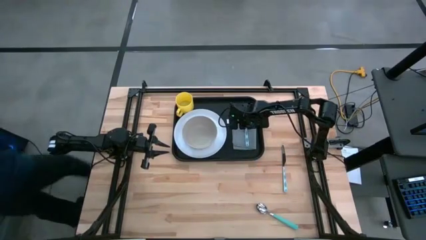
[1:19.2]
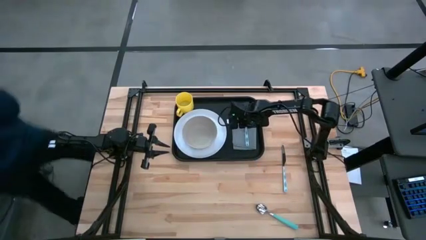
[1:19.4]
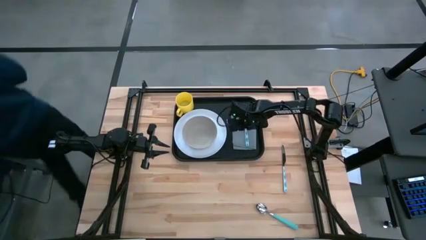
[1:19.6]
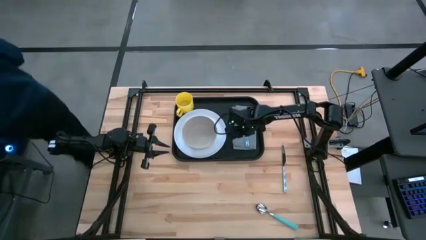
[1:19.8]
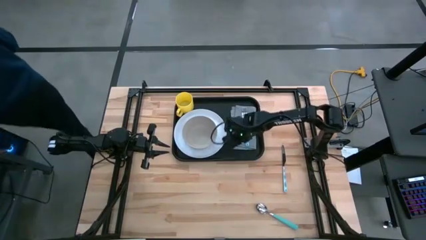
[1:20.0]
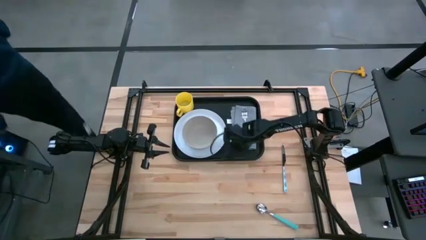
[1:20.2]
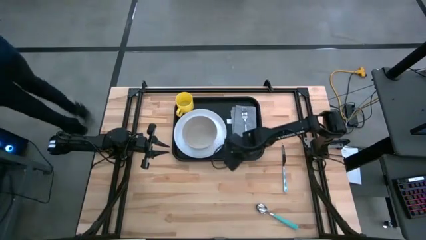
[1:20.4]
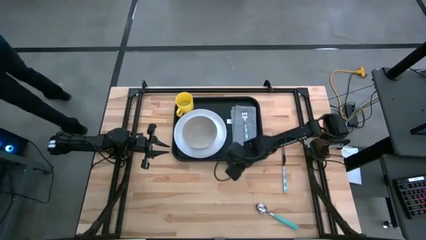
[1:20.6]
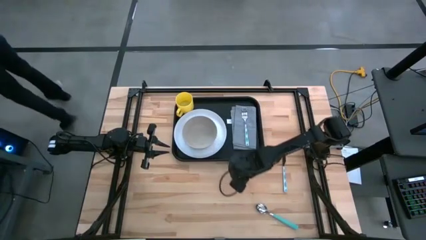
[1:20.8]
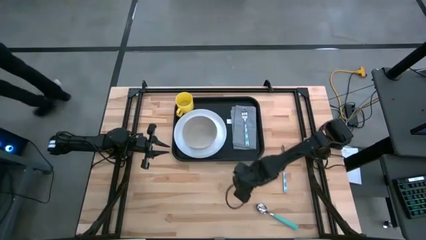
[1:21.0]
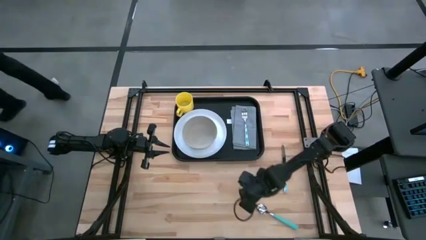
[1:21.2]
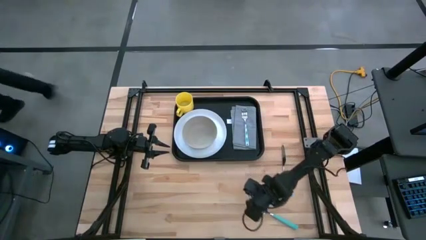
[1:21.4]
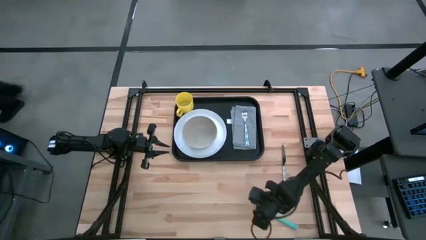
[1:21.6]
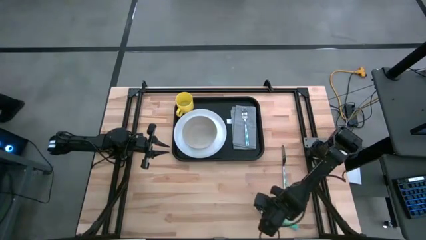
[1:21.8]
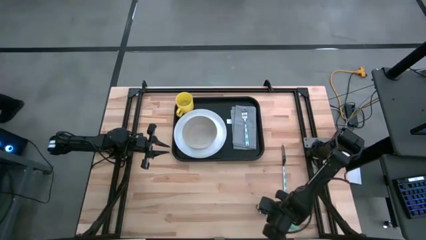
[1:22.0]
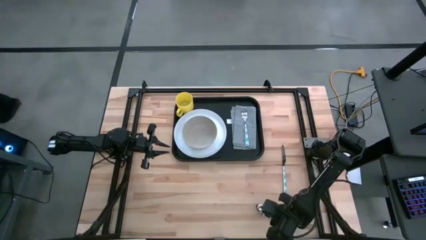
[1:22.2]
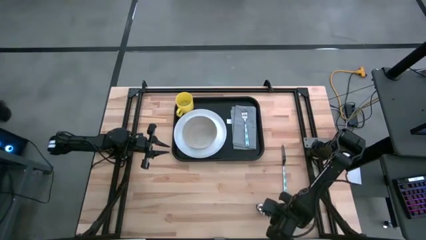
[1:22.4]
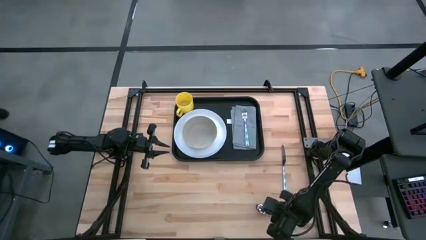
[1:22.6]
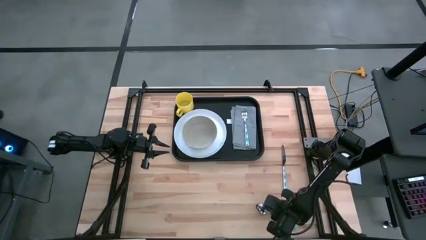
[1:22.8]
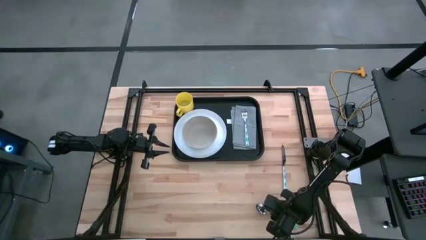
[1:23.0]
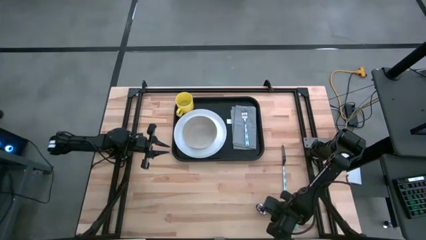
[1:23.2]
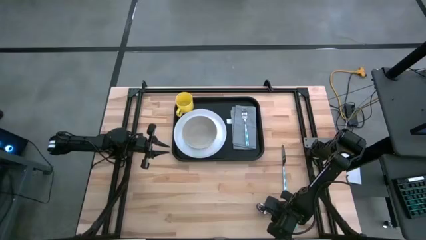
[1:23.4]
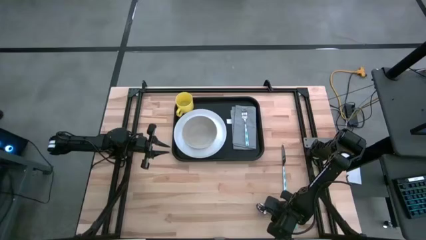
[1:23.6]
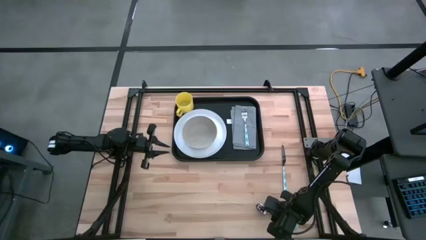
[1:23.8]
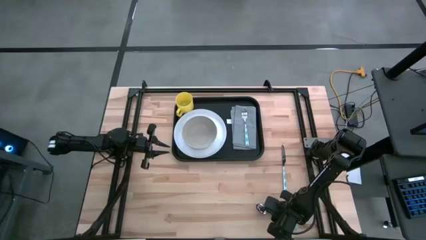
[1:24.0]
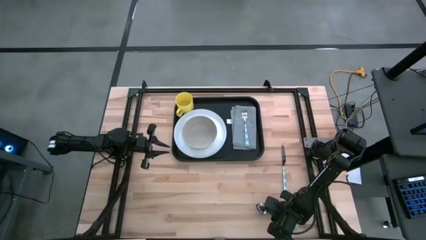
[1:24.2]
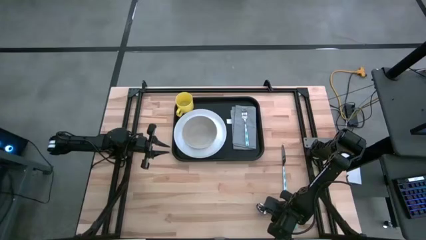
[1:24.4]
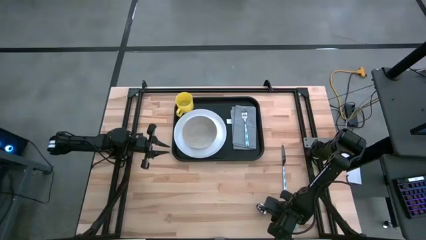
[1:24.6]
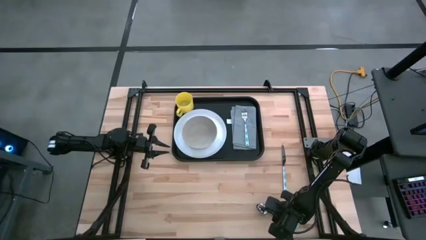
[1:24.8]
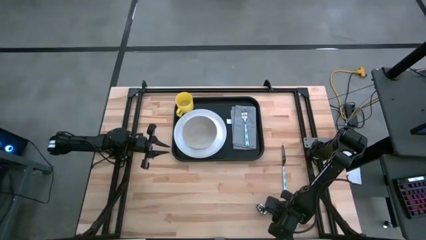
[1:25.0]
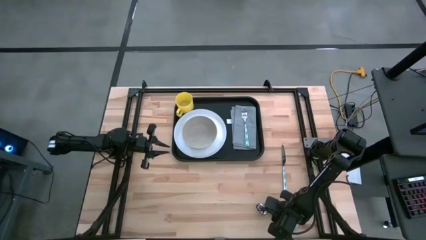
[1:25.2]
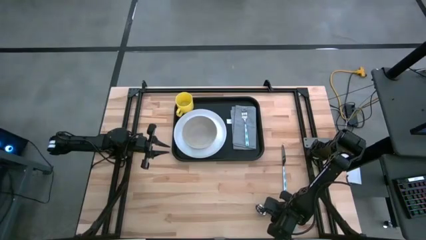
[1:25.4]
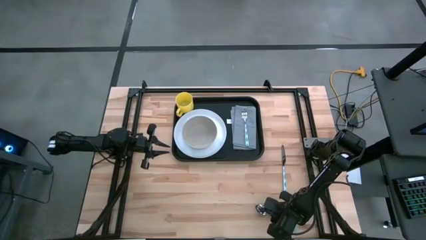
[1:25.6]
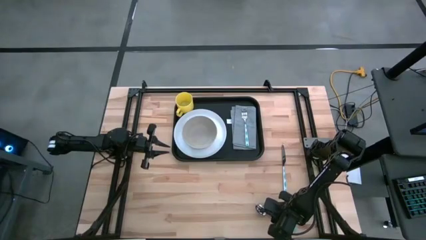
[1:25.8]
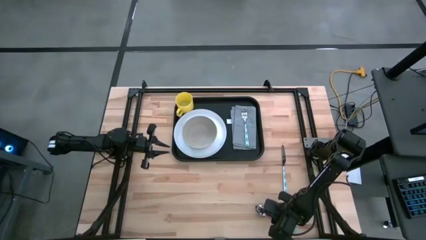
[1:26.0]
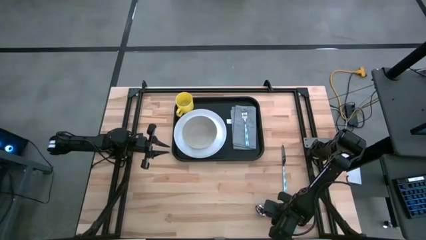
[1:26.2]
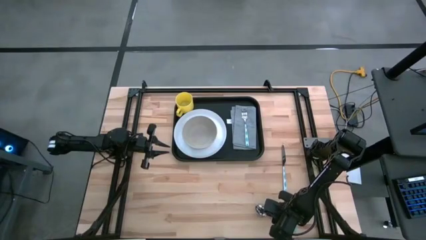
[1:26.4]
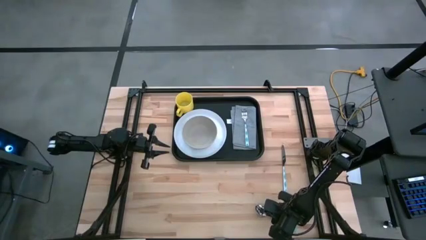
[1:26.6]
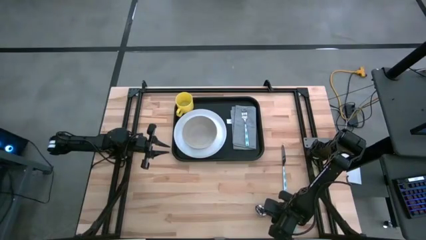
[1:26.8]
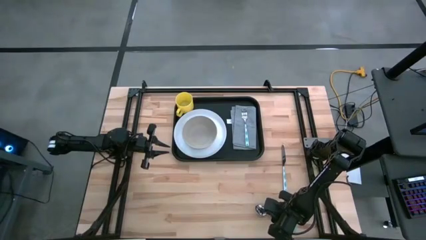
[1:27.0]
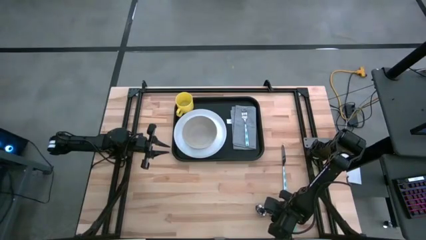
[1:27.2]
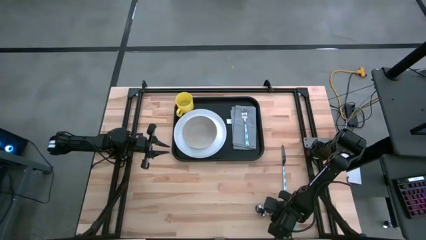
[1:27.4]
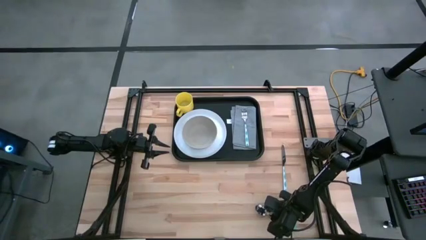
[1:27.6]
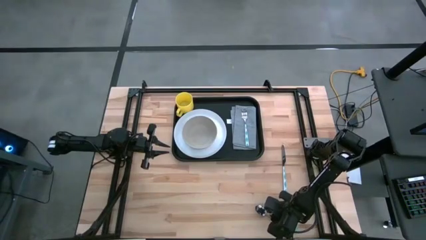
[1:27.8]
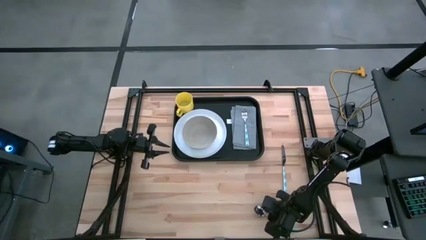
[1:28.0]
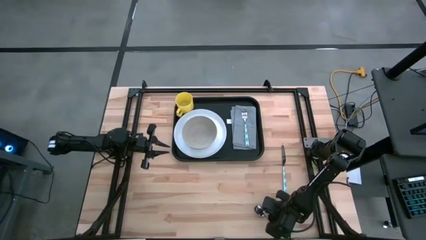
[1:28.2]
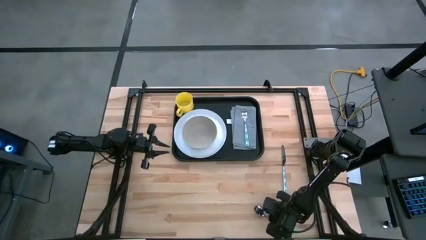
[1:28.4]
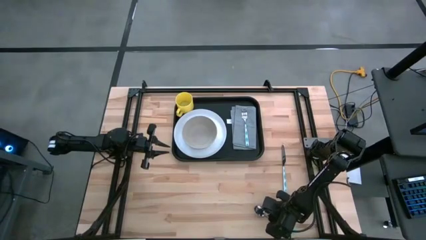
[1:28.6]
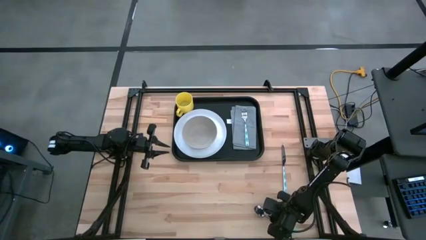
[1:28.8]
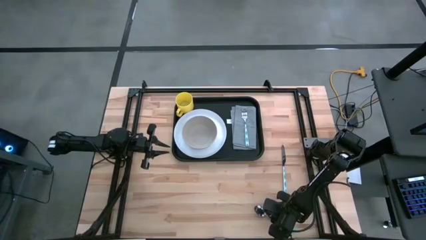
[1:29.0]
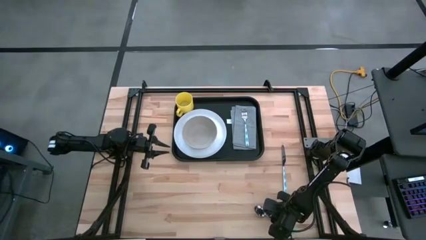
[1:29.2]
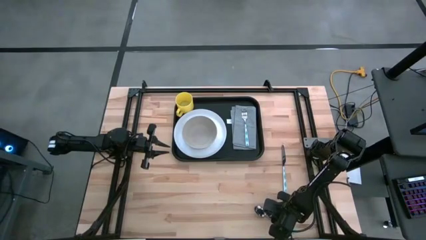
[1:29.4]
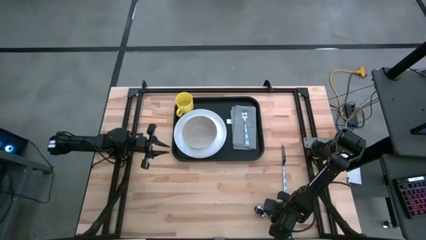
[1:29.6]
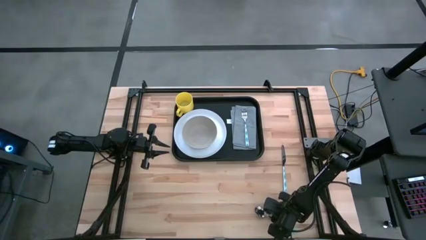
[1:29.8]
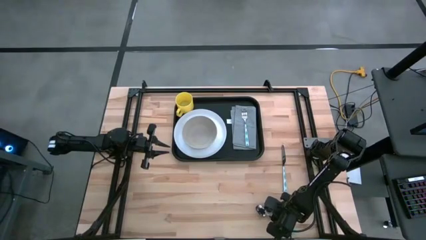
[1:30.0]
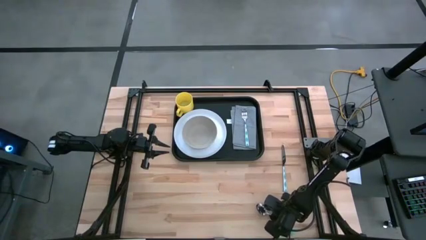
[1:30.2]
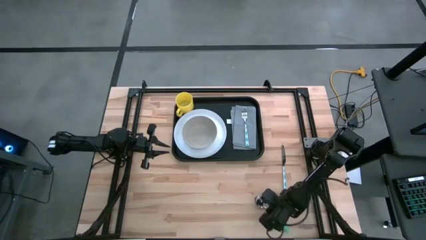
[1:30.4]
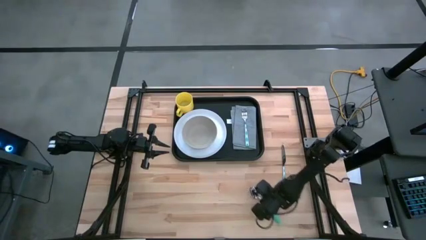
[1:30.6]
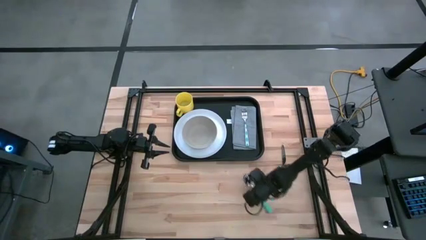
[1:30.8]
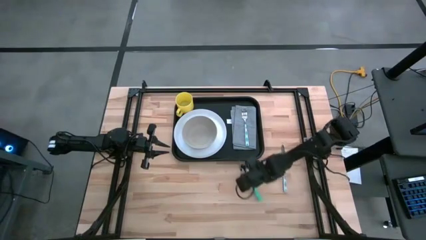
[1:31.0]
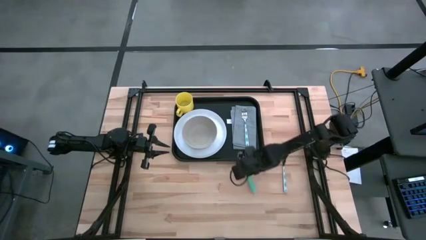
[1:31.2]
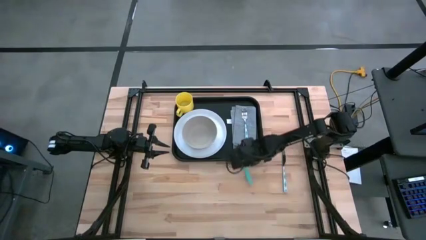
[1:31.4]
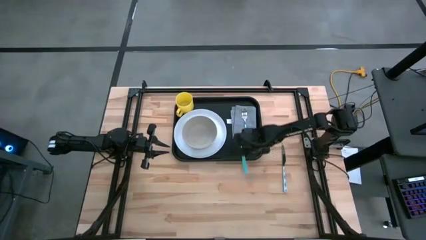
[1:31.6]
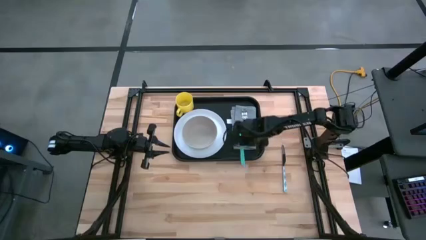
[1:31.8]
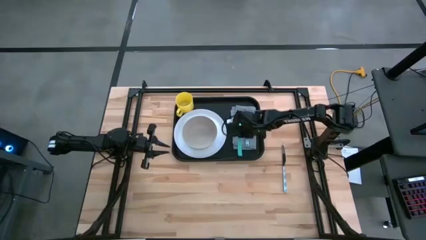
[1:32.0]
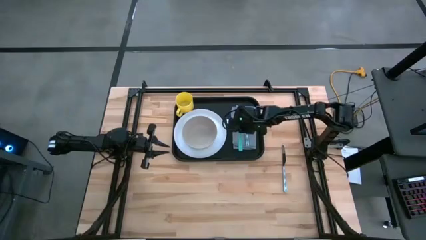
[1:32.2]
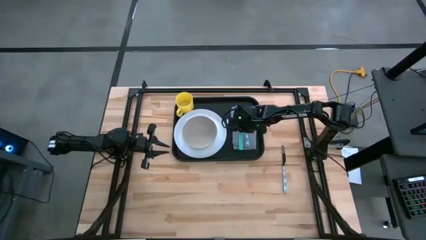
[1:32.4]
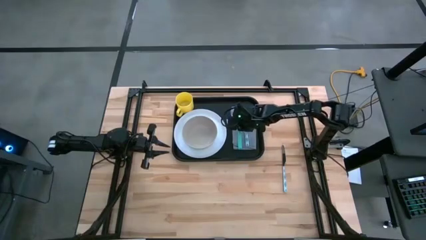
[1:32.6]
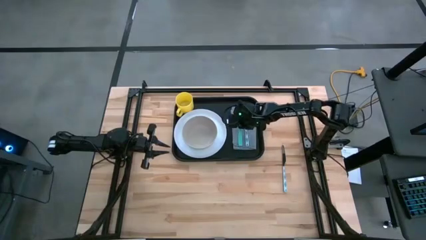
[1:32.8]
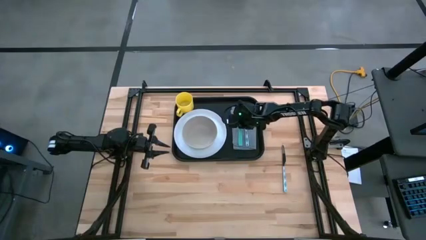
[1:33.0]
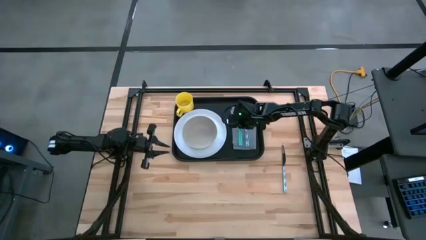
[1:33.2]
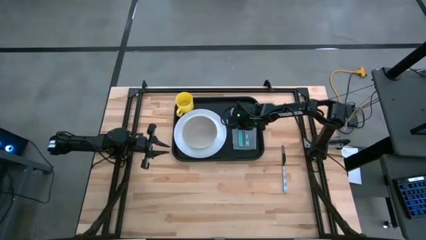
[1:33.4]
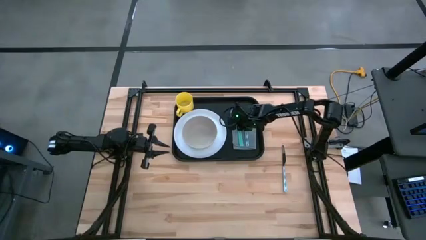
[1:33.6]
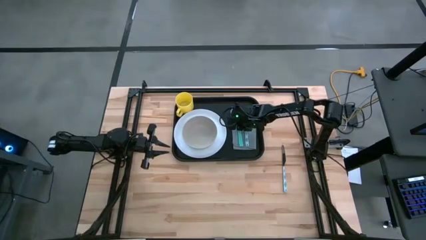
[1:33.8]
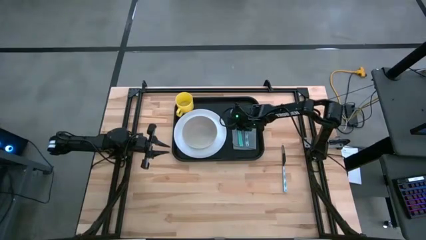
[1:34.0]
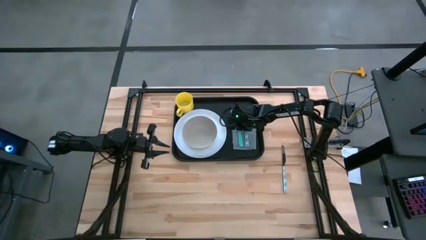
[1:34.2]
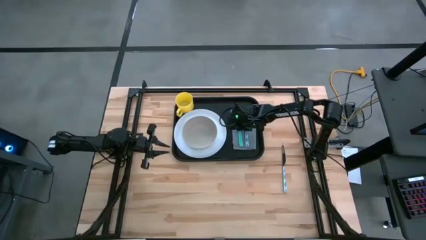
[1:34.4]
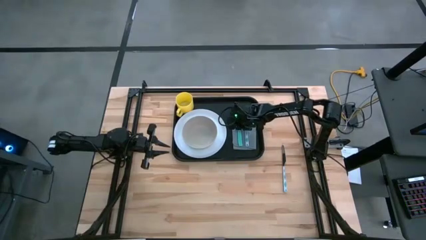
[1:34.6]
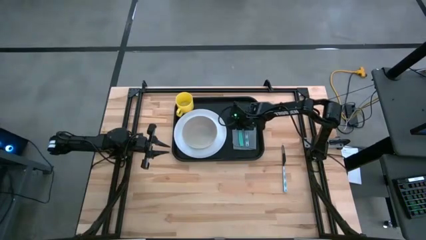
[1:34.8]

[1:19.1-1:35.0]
Task: Set up tray
Put the blue spoon on the gray napkin to the right of the white plate

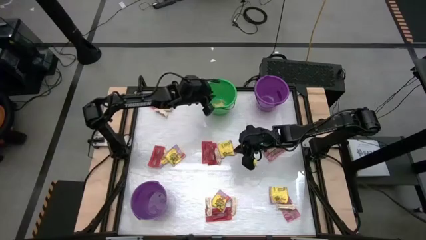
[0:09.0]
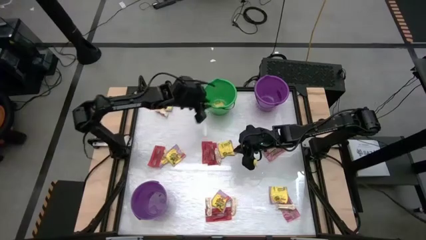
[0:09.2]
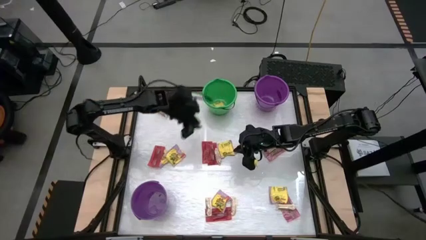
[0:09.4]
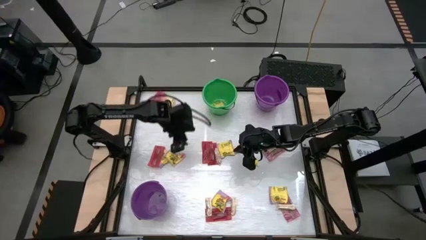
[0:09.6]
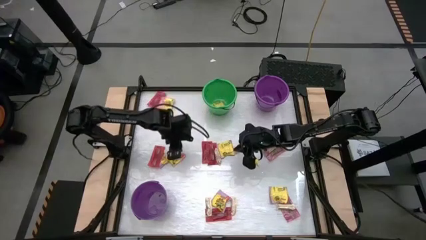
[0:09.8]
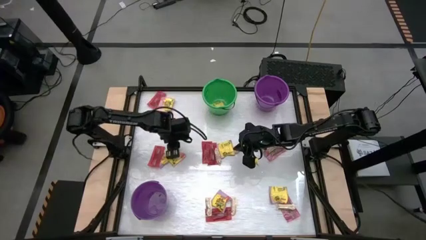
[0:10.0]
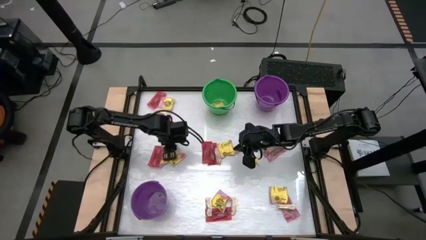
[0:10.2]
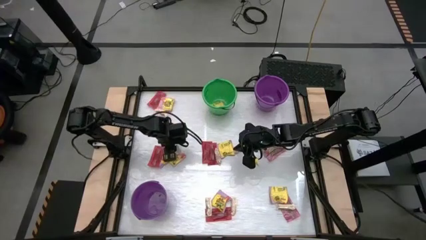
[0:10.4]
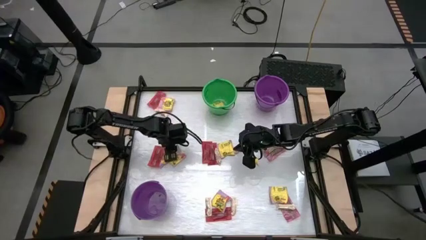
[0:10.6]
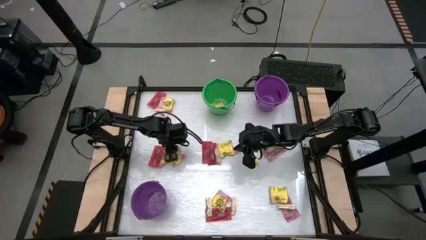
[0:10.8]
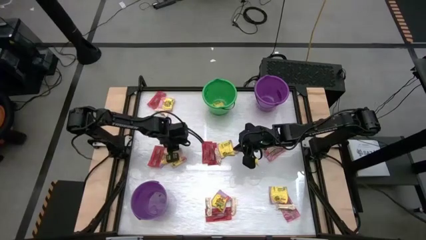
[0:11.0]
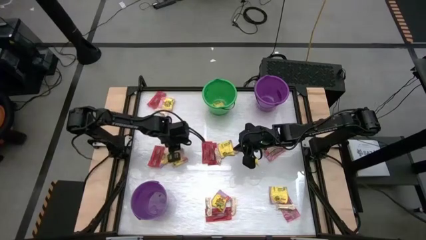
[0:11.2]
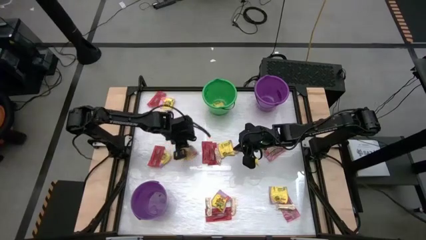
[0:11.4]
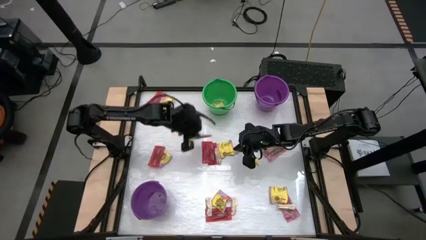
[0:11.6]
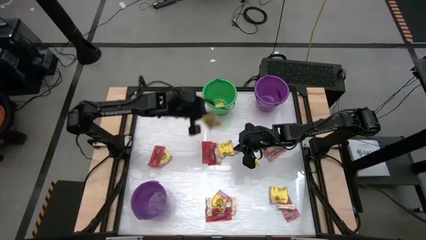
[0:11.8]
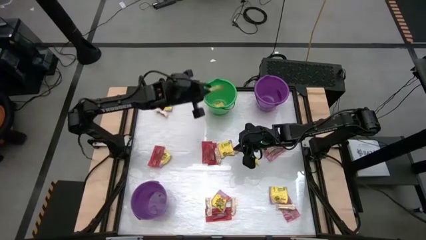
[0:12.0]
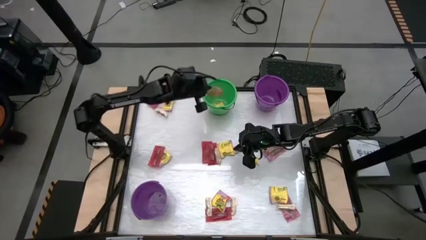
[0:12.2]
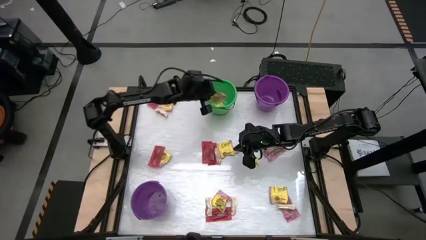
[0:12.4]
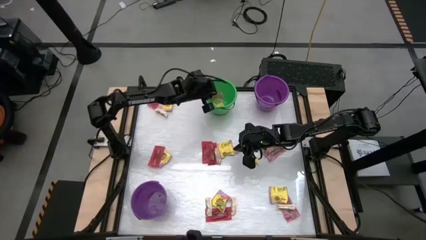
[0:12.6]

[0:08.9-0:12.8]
Task: Sort candy by brand, put in halloween buckets
Put the yellow candy into the green bucket
